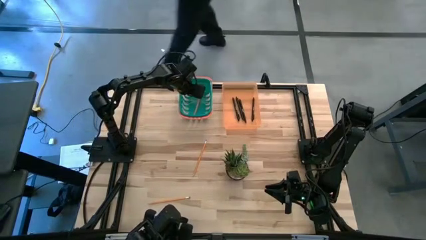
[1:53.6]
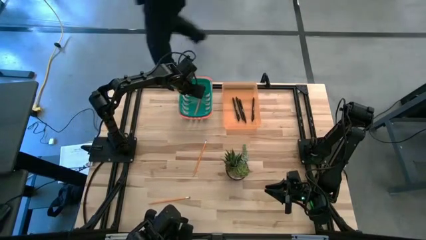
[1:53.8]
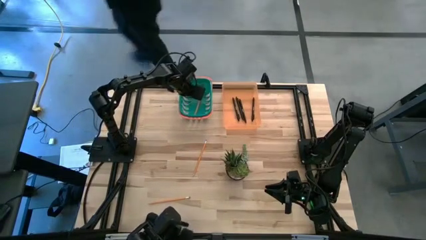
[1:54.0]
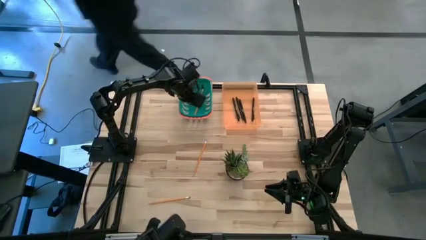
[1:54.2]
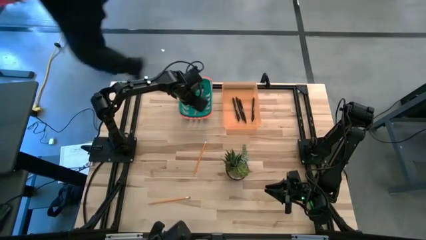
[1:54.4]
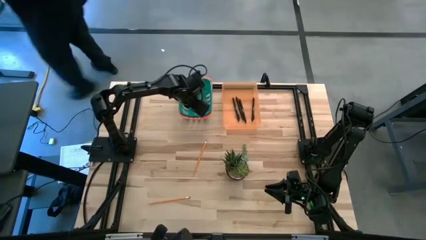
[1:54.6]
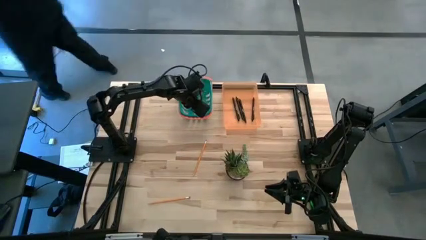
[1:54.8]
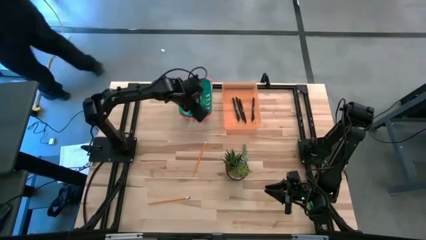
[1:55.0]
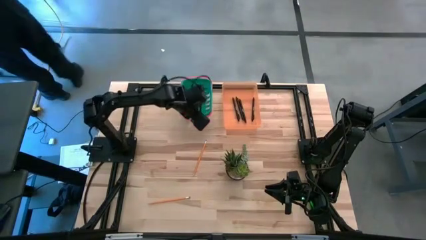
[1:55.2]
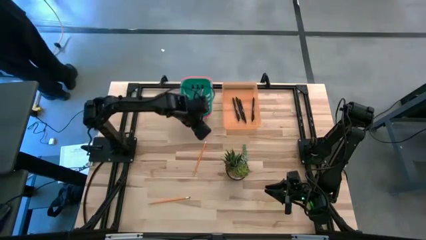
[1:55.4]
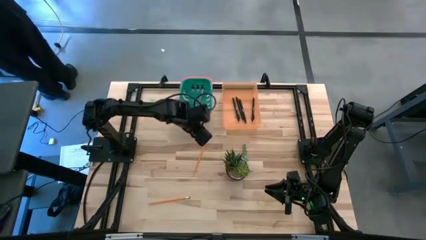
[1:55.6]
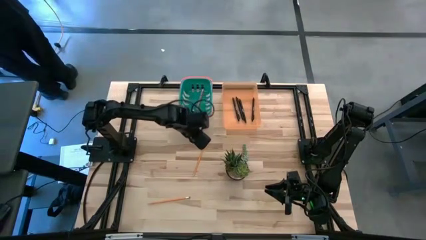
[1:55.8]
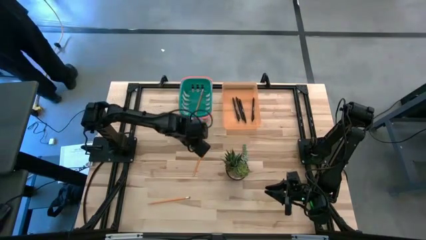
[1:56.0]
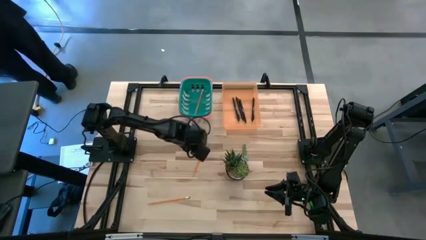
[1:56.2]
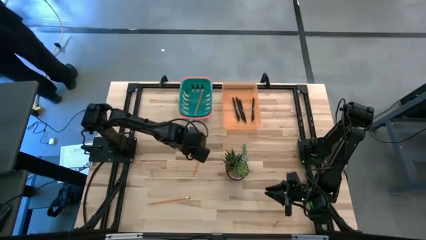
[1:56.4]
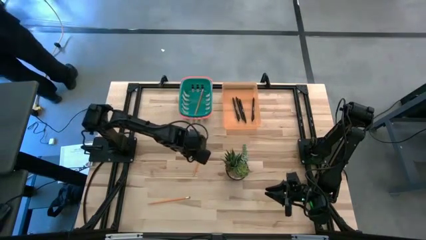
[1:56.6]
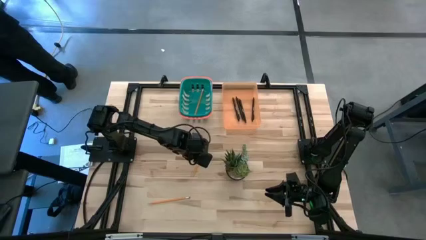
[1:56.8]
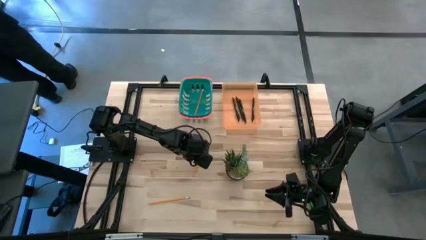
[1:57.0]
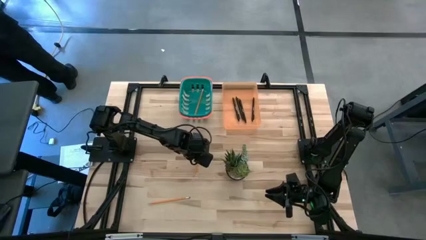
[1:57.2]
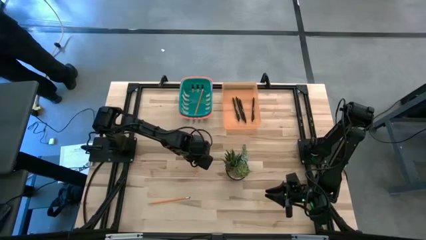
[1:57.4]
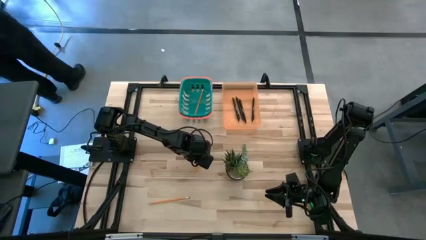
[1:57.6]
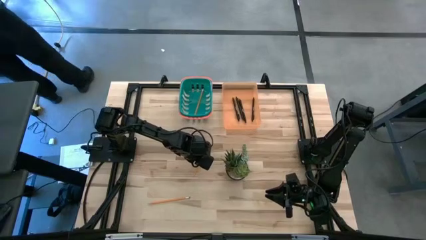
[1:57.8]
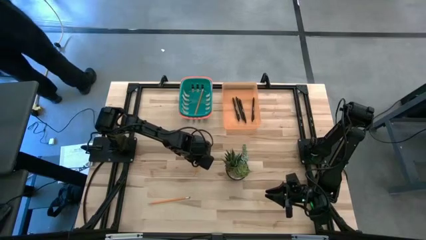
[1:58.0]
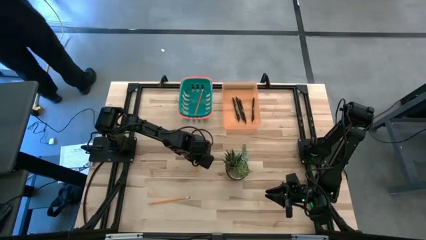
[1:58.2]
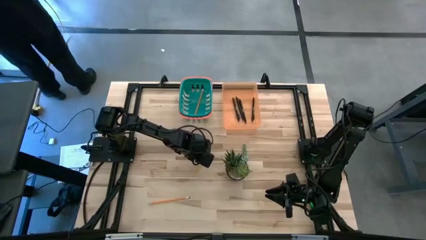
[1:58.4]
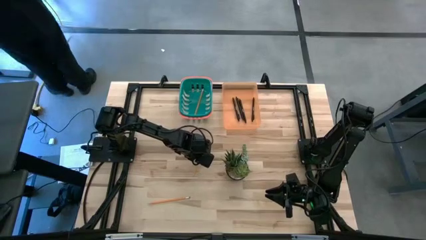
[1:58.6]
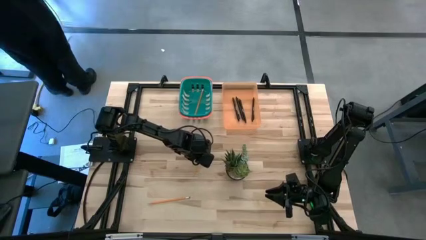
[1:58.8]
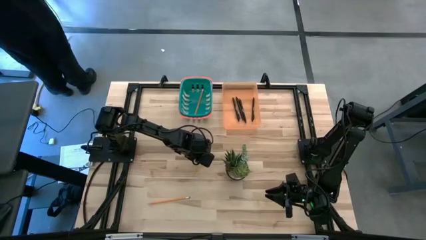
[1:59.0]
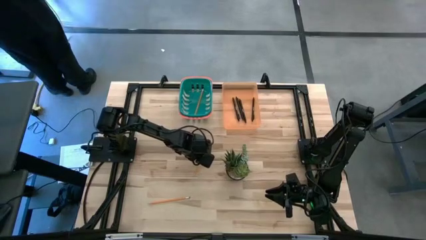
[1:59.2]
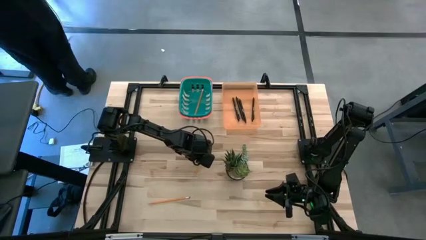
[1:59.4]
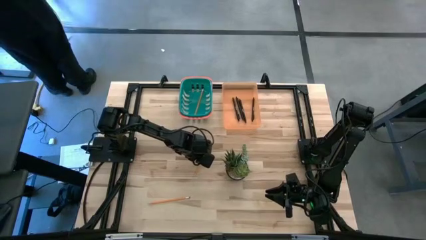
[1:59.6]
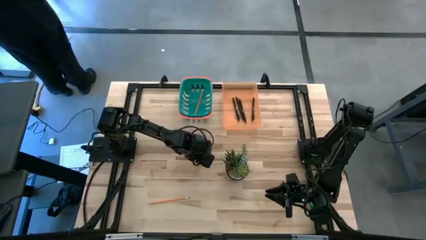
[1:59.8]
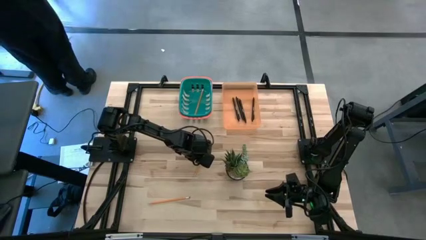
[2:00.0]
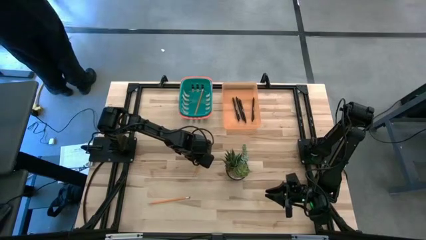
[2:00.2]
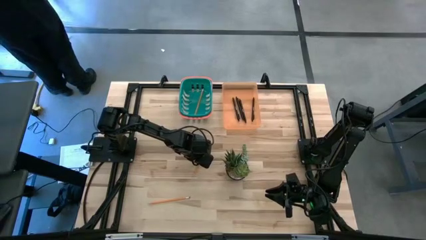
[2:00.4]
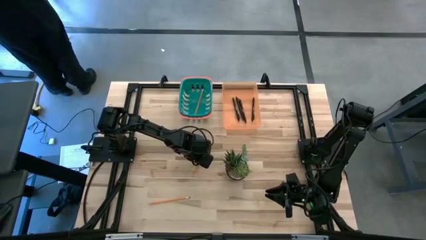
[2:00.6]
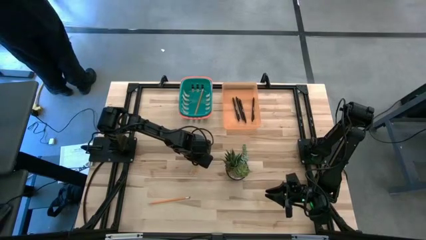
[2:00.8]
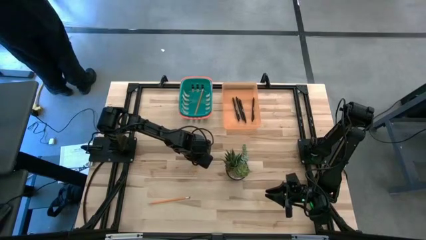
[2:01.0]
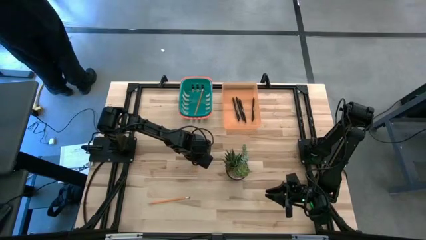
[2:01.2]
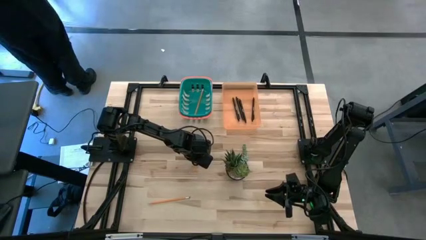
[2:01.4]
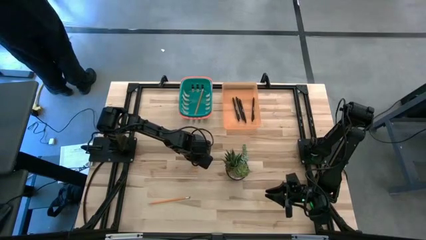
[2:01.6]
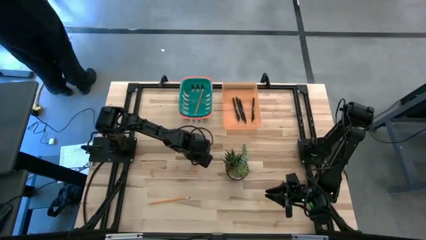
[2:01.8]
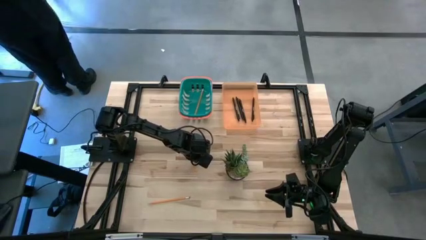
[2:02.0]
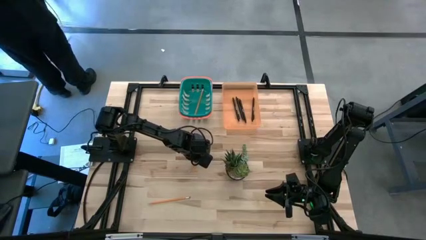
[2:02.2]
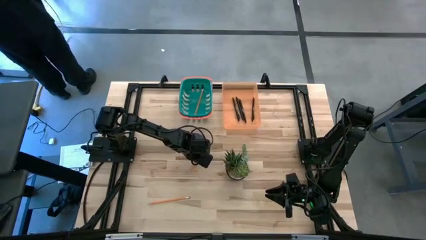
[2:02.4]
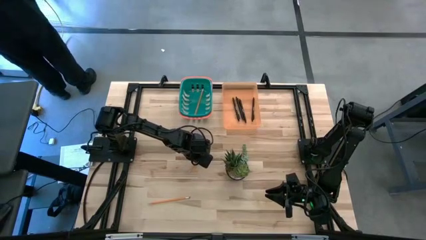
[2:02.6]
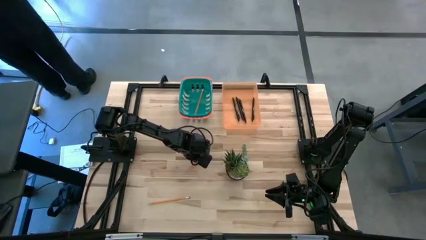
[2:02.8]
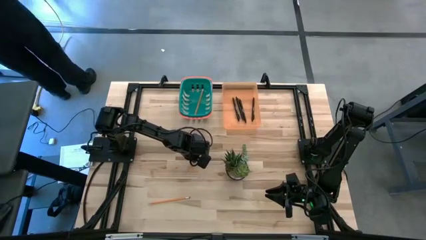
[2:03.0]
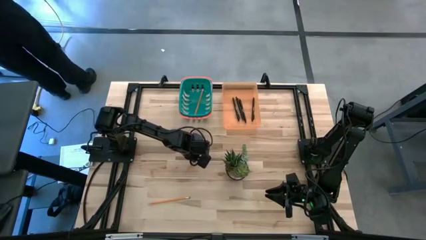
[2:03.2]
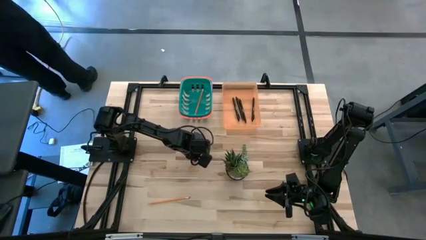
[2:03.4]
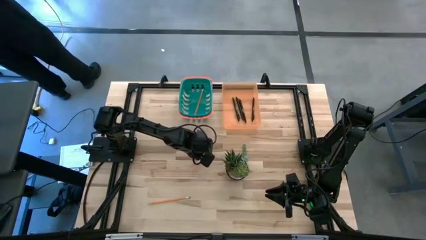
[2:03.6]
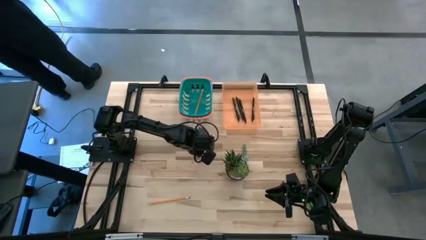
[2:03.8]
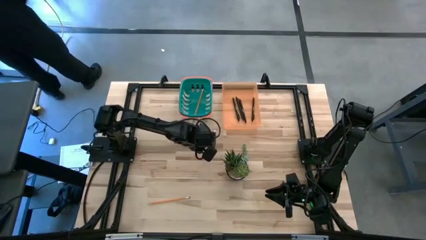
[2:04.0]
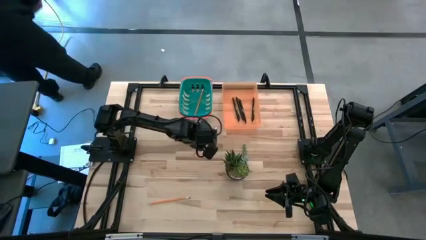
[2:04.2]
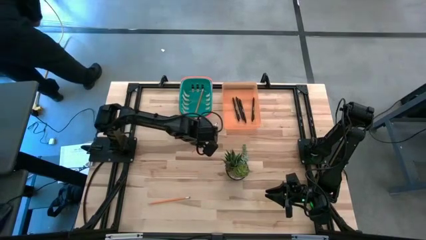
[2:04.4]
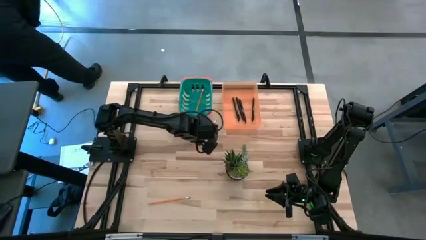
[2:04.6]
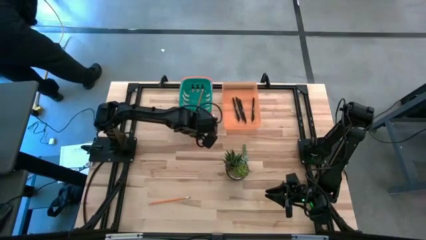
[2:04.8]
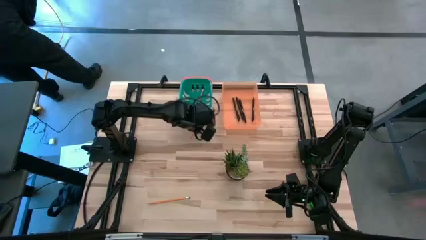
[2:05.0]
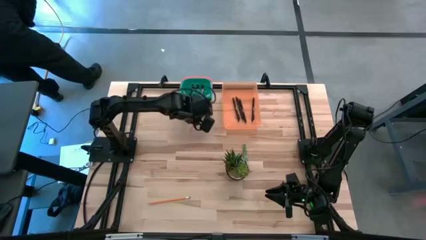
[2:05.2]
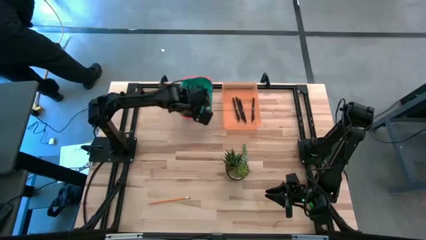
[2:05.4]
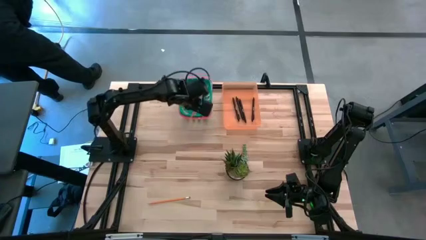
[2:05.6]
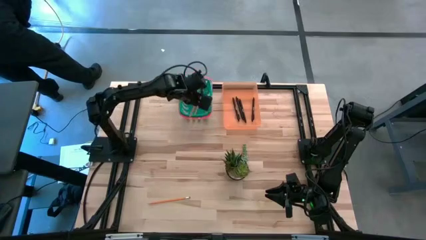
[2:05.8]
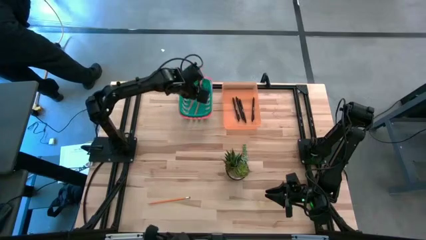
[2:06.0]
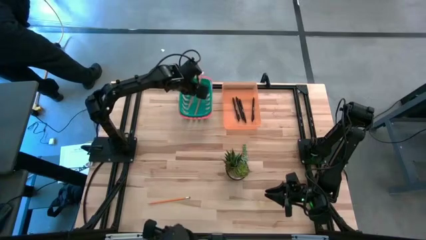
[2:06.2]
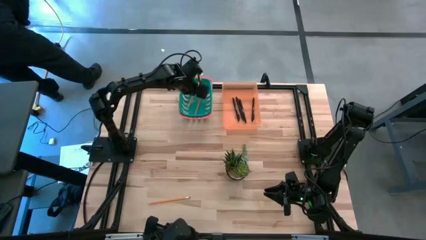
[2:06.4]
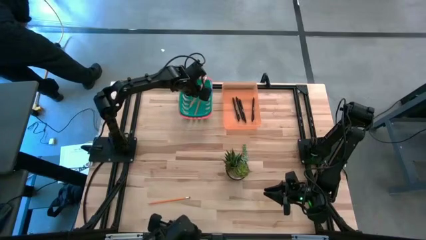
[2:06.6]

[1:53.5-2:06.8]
Task: Sort pens & pencils
Put the top pencil into the green bin
